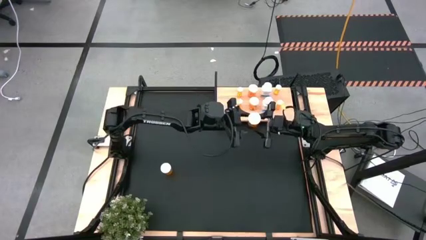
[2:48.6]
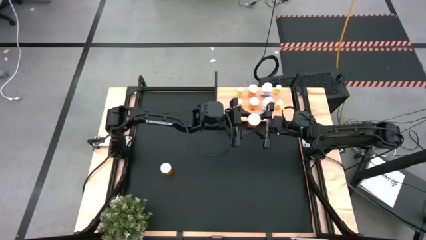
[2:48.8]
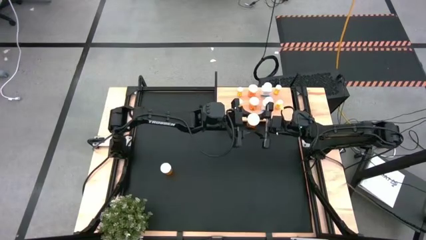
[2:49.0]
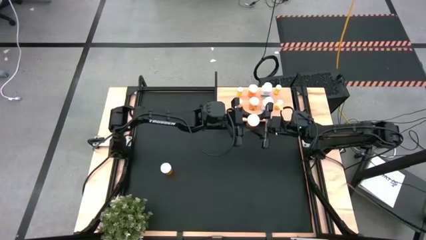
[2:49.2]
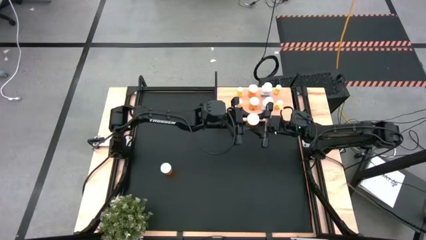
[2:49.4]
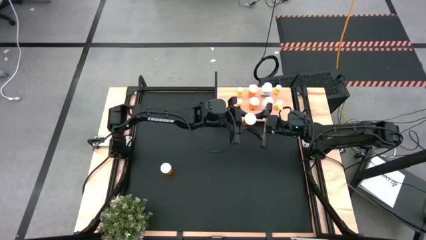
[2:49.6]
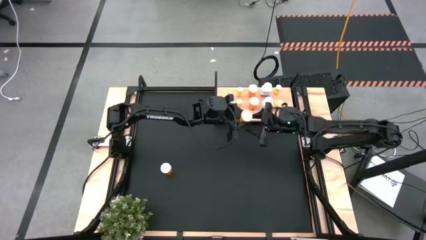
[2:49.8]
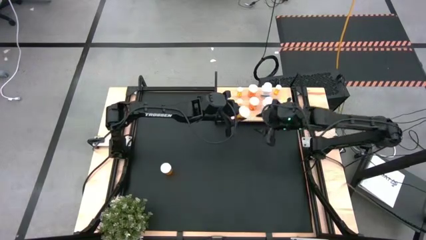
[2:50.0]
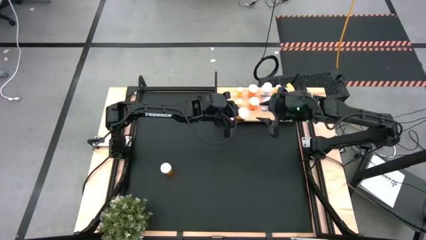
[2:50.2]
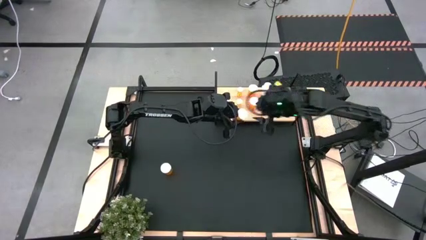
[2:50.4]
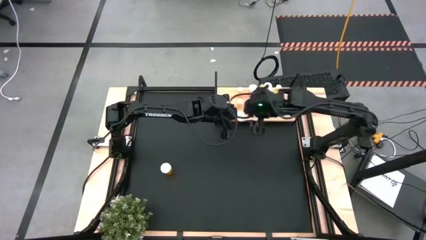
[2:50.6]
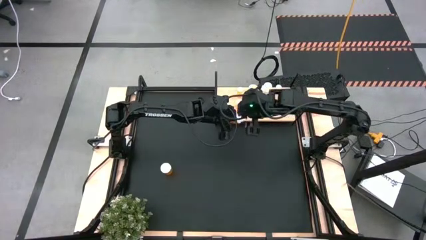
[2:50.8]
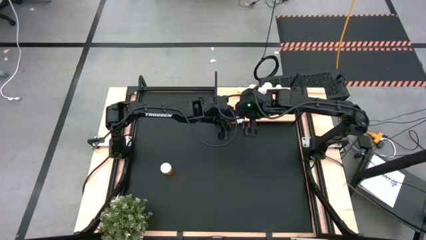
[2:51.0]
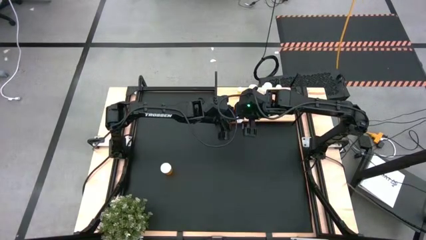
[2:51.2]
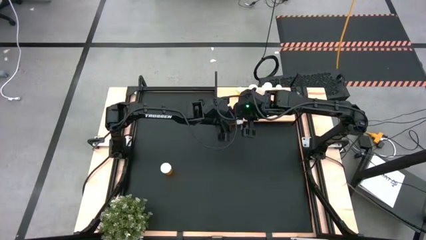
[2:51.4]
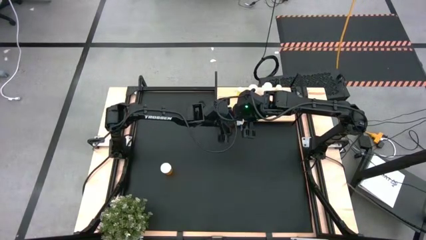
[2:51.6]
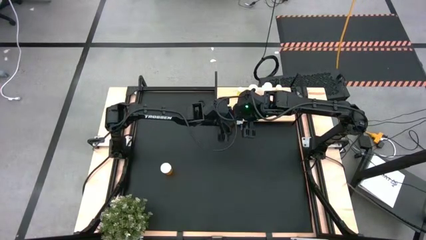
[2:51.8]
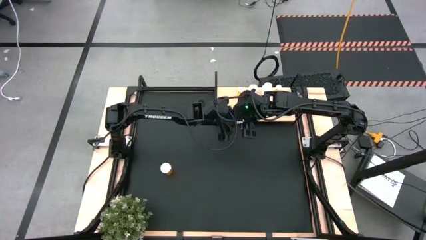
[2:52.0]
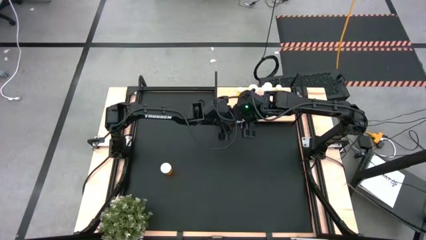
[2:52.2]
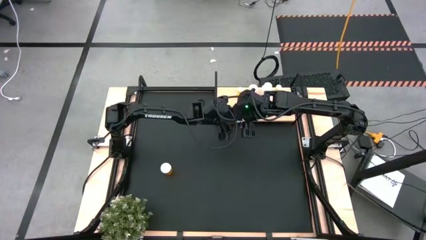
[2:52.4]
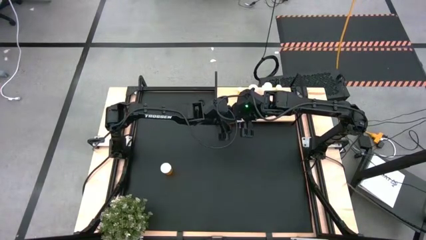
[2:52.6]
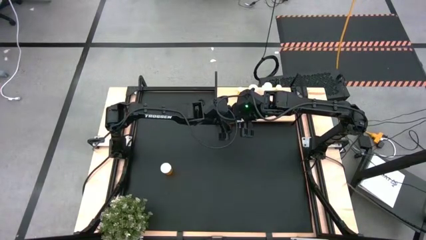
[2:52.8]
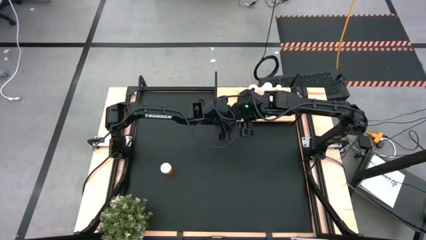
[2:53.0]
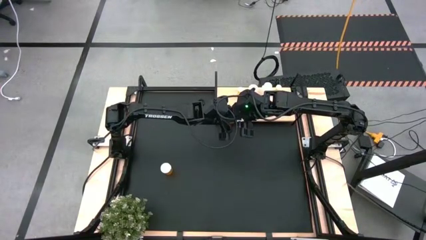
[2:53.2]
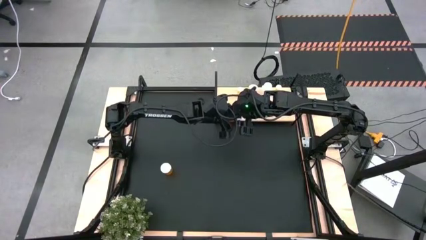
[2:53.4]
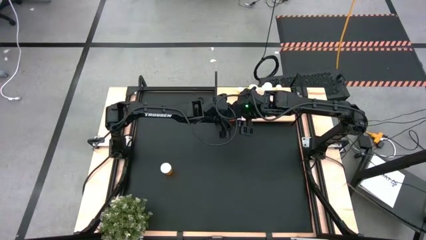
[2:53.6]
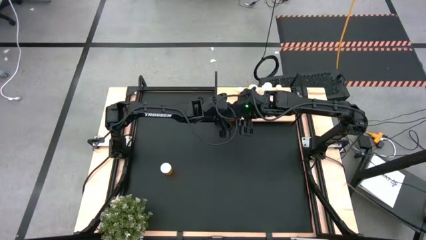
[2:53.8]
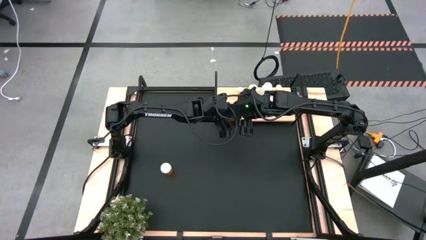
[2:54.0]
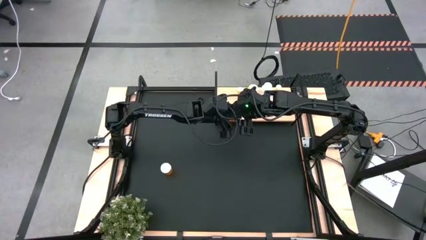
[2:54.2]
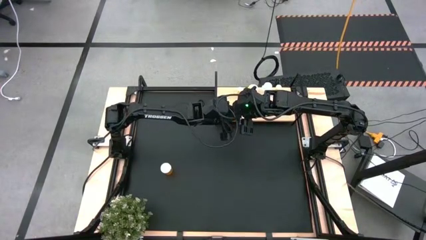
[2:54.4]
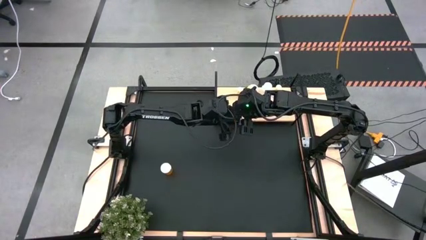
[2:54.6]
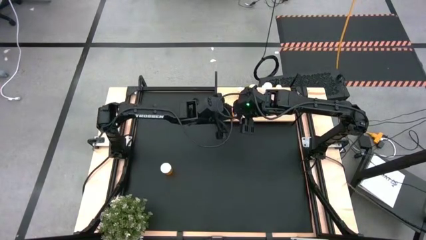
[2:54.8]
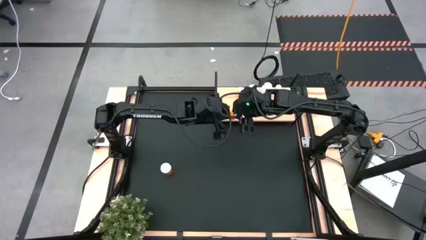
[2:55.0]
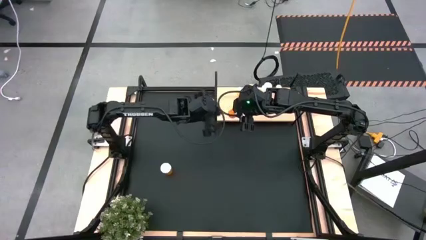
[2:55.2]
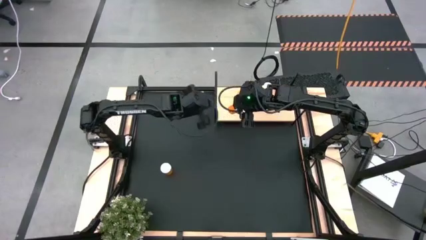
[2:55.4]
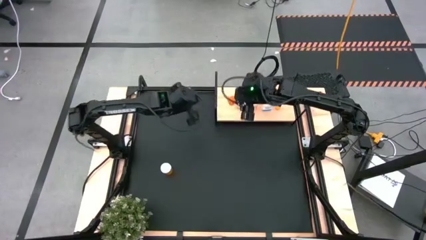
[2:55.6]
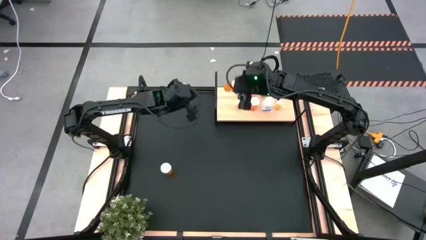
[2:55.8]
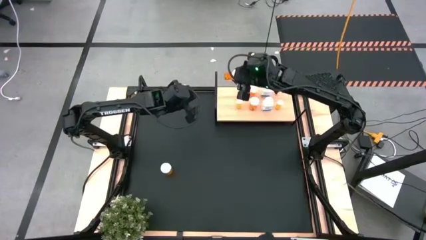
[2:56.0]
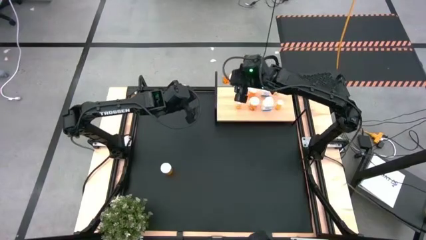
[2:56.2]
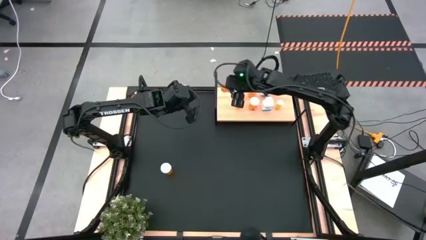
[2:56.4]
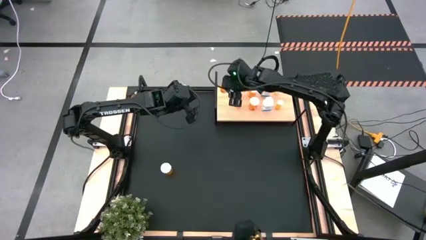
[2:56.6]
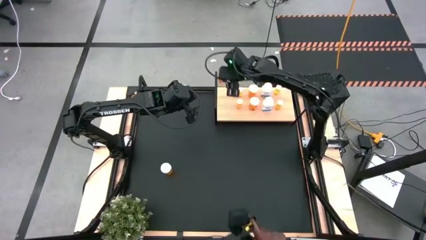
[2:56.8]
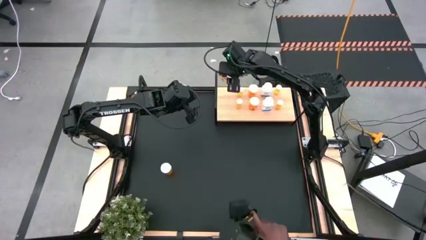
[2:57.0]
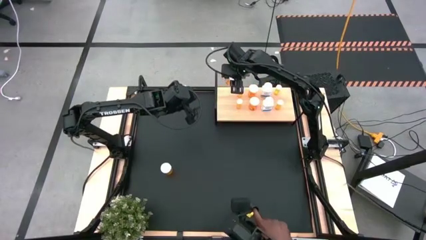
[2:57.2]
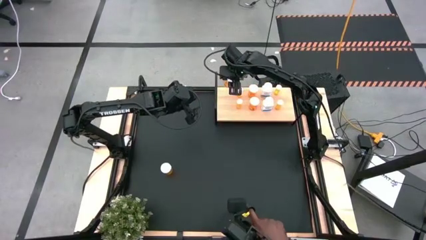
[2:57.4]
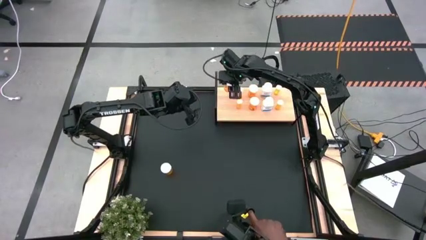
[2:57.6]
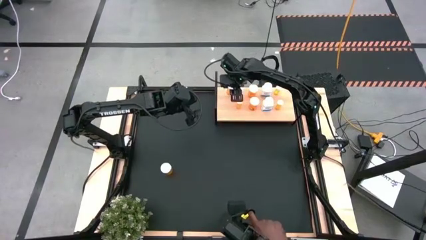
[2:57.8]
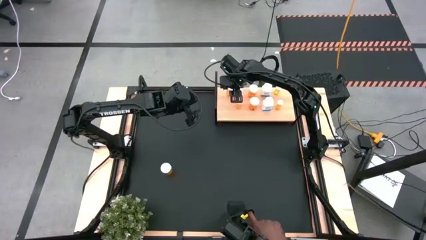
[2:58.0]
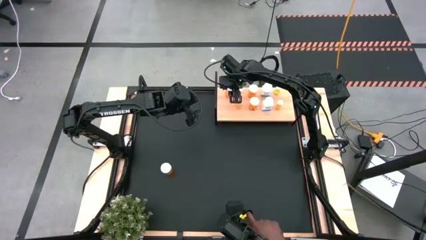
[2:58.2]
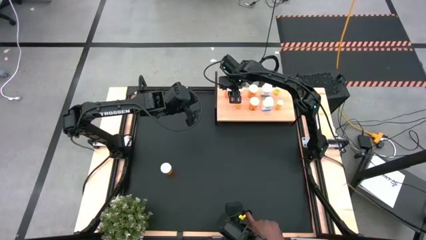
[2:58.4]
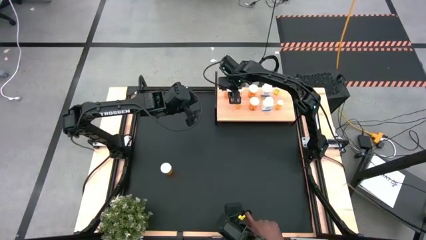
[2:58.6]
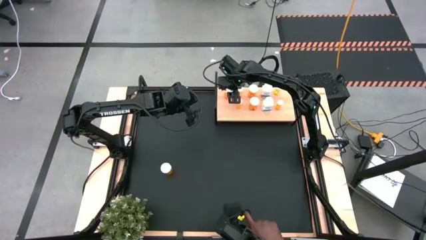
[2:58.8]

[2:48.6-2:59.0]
Task: Pick and place medicine bottles onto shelf by color
Put the large orange pill bottle on the shelf

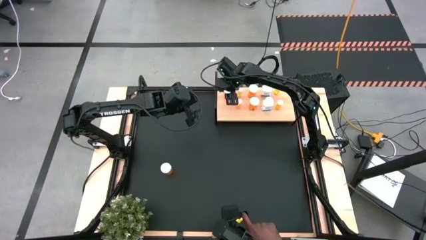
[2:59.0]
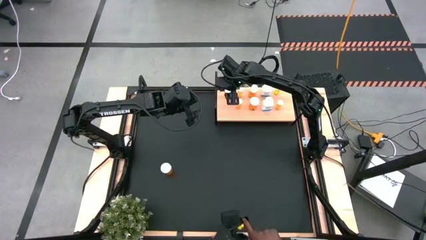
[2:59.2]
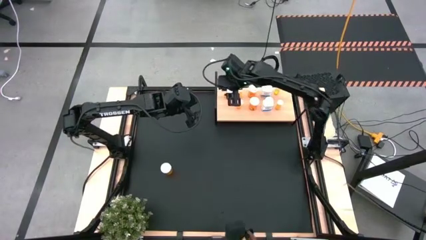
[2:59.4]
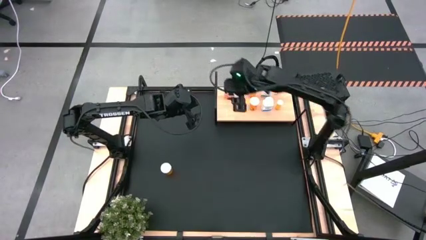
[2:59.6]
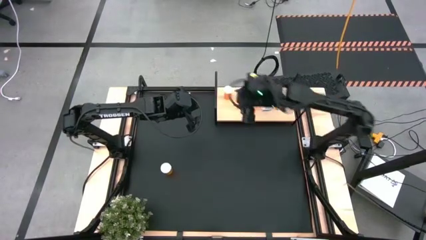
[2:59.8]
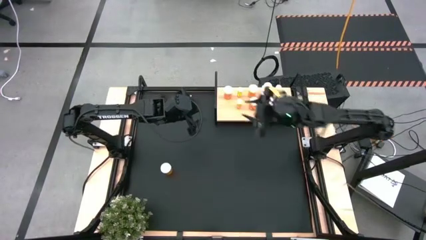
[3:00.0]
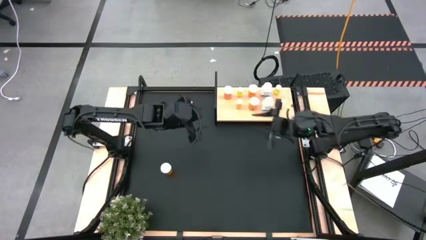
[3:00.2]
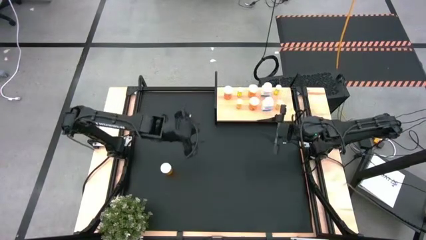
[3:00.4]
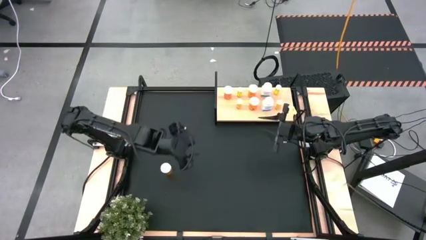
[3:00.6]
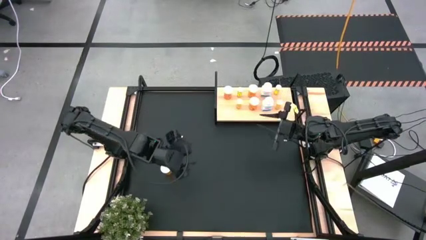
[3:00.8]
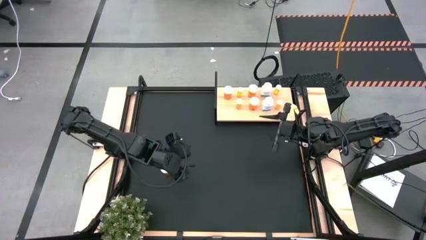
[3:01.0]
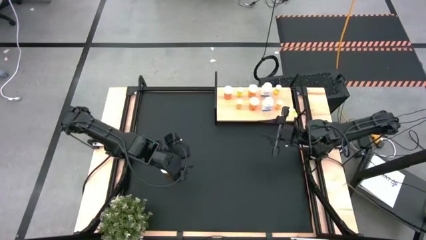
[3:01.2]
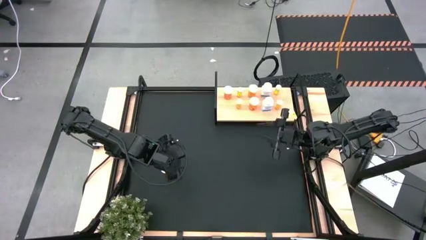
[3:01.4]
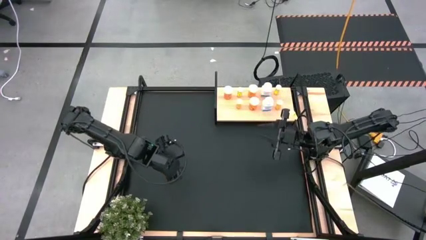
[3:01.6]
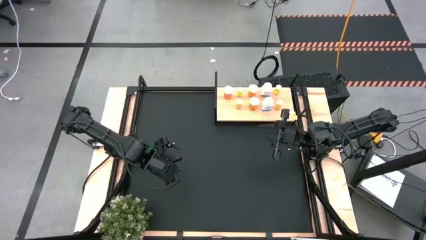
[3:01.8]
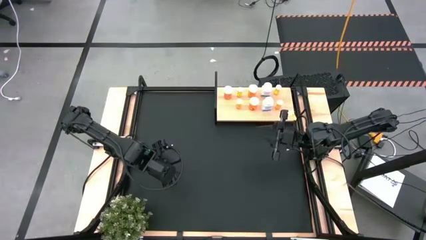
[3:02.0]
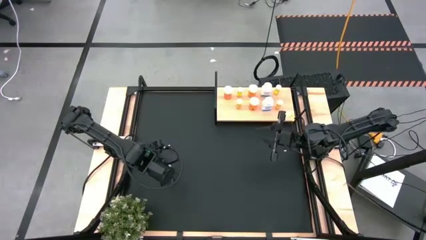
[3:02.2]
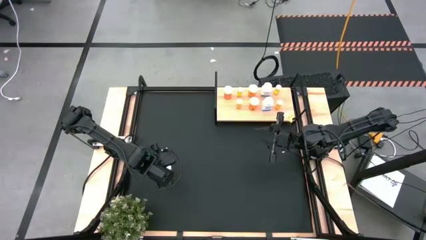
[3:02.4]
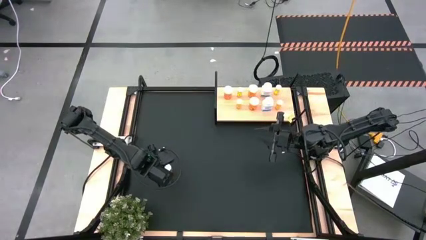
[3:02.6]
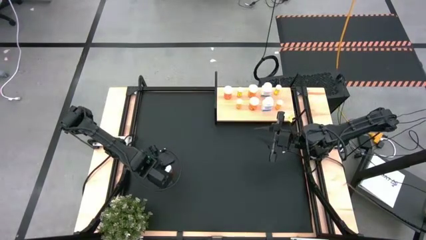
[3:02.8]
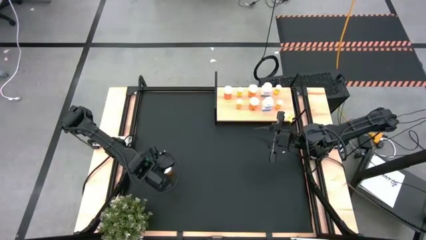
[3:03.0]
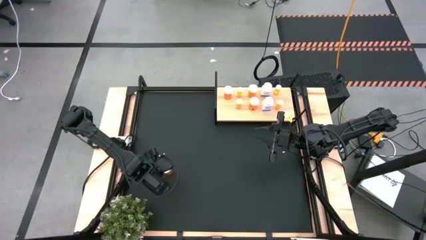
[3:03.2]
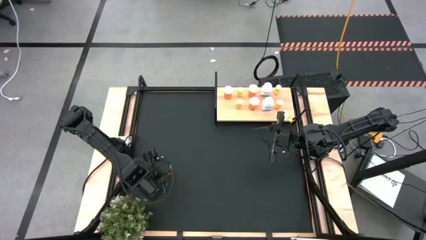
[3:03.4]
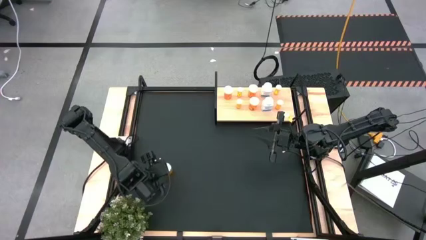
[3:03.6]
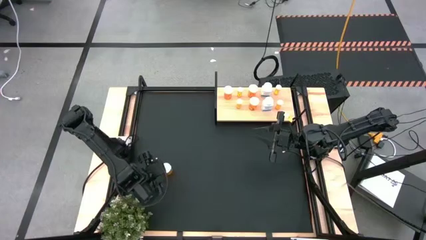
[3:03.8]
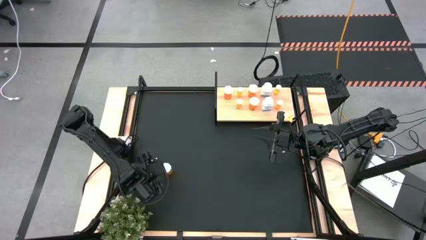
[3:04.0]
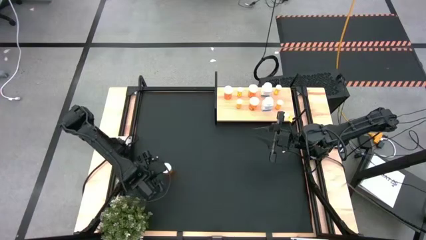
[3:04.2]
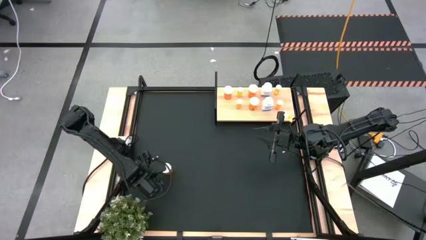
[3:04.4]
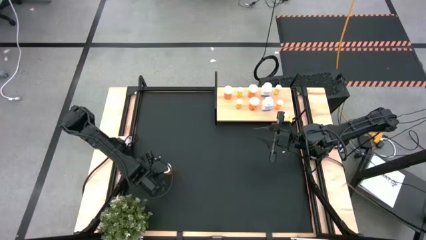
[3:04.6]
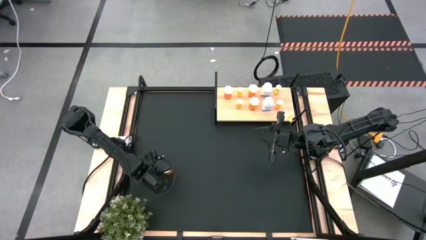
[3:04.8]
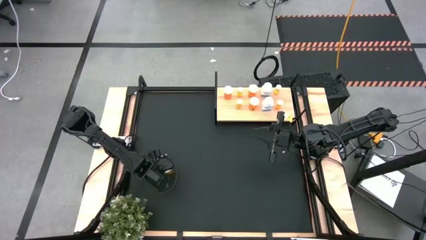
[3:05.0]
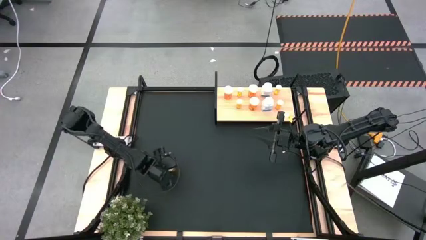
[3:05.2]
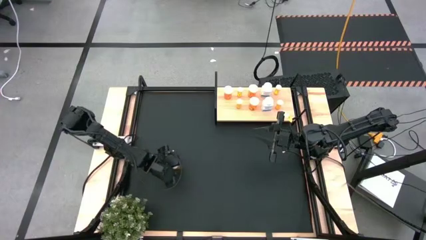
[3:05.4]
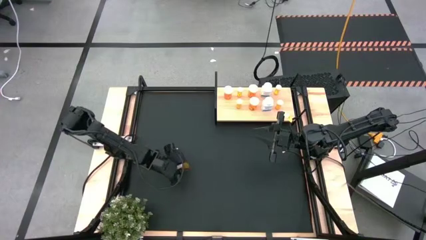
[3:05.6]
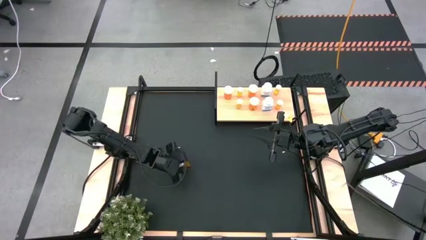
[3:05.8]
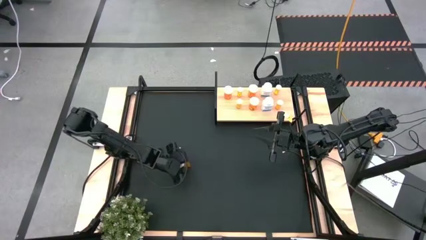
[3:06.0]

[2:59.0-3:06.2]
Put the large orange pill bottle on the shelf aligned with the other large orange pill bottle
